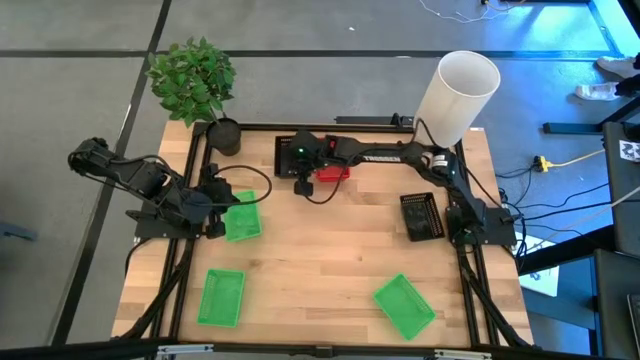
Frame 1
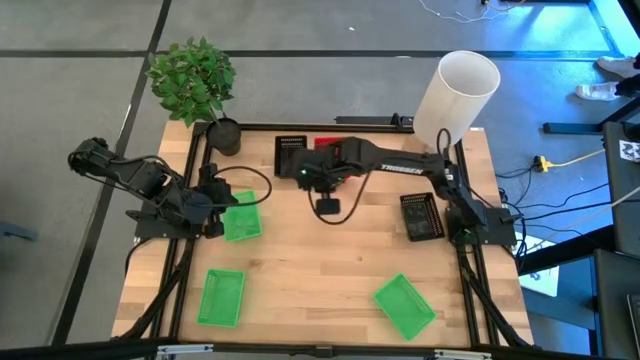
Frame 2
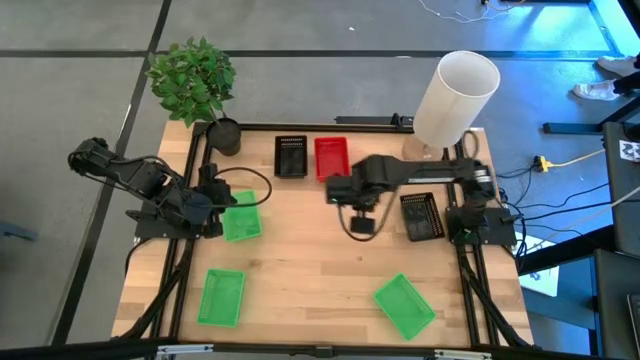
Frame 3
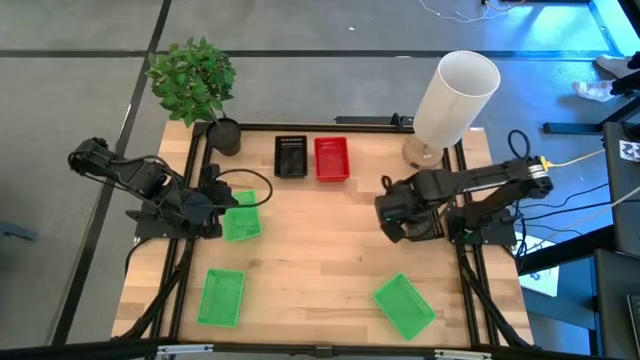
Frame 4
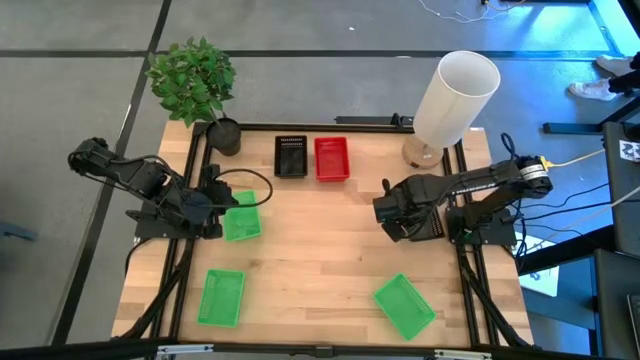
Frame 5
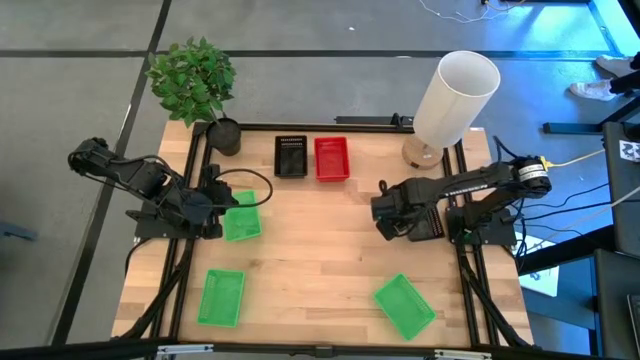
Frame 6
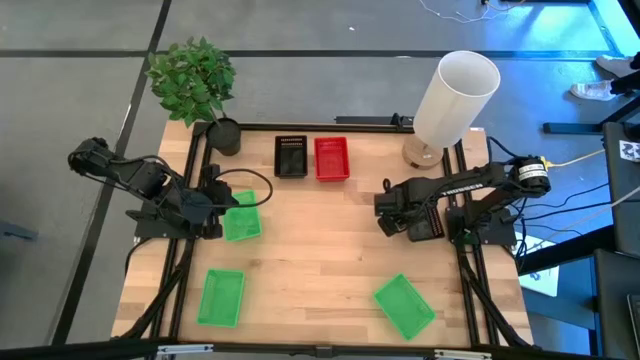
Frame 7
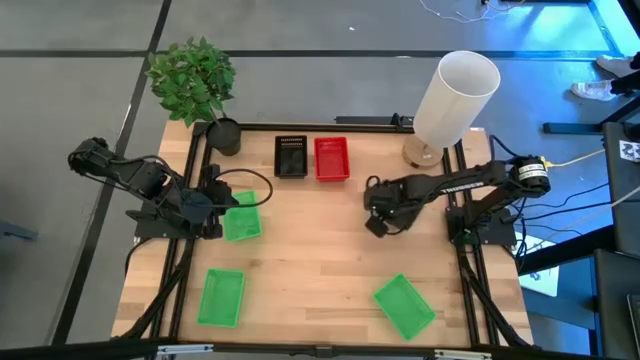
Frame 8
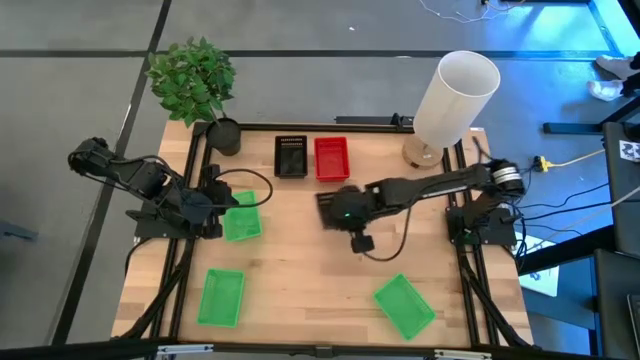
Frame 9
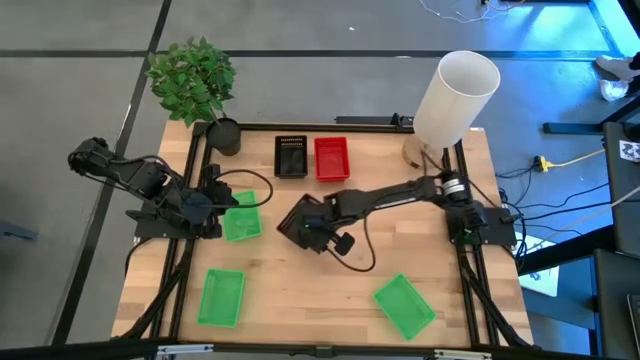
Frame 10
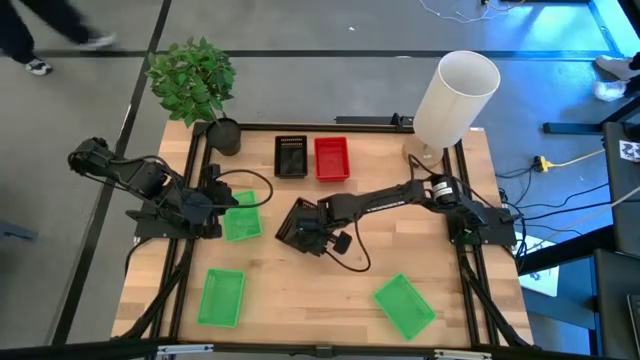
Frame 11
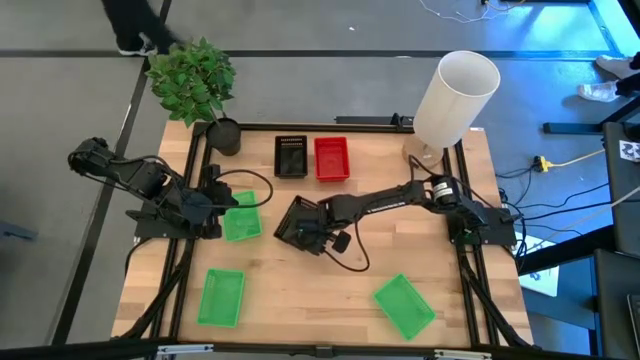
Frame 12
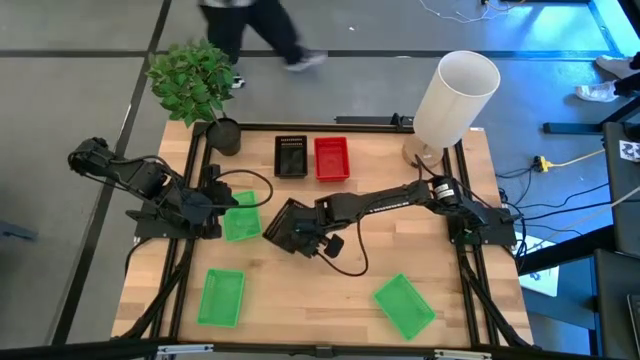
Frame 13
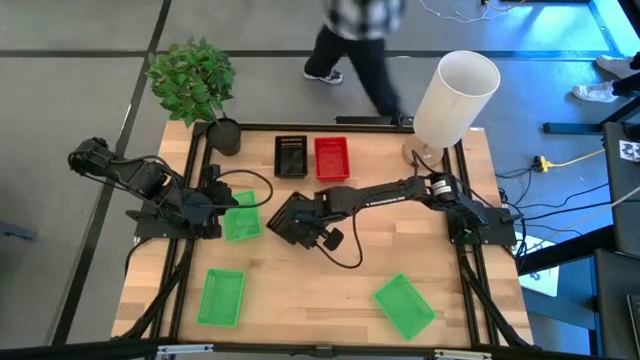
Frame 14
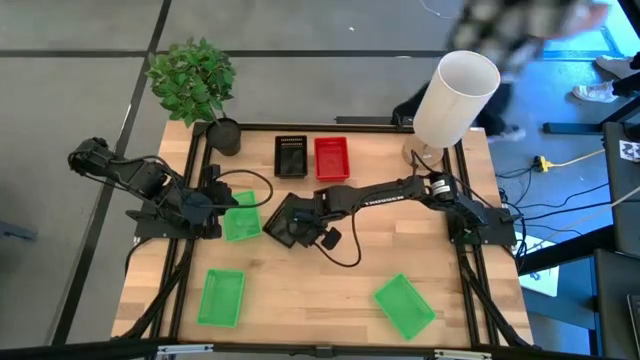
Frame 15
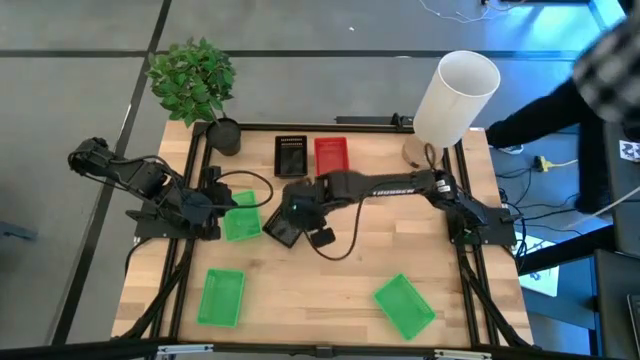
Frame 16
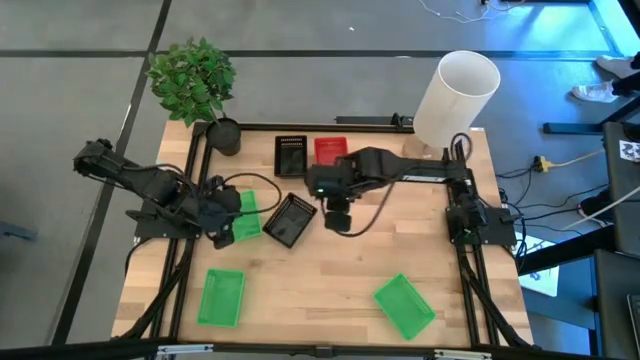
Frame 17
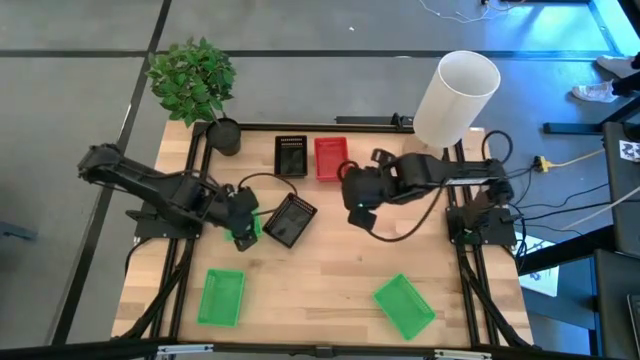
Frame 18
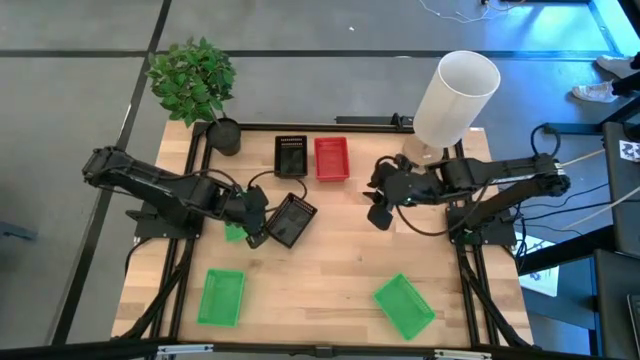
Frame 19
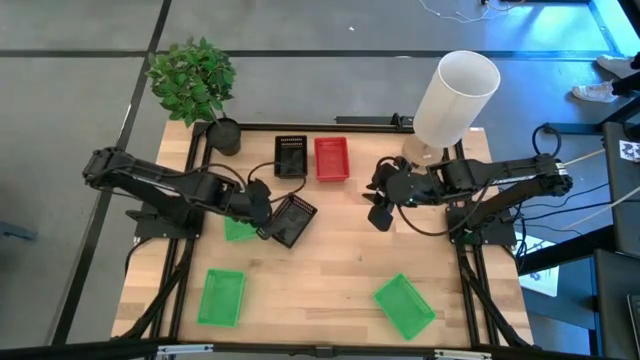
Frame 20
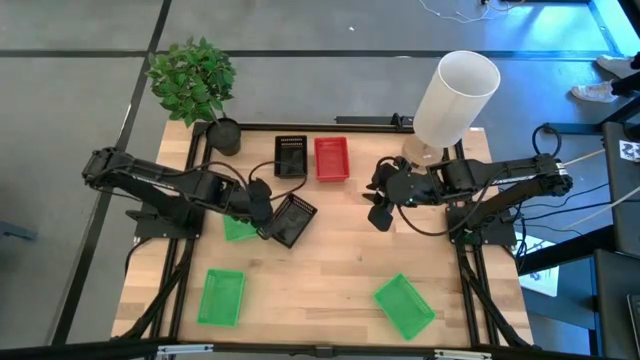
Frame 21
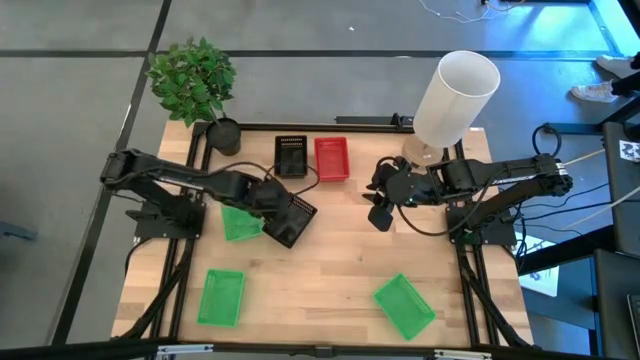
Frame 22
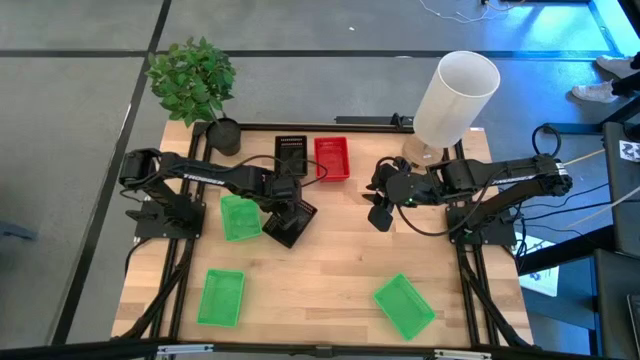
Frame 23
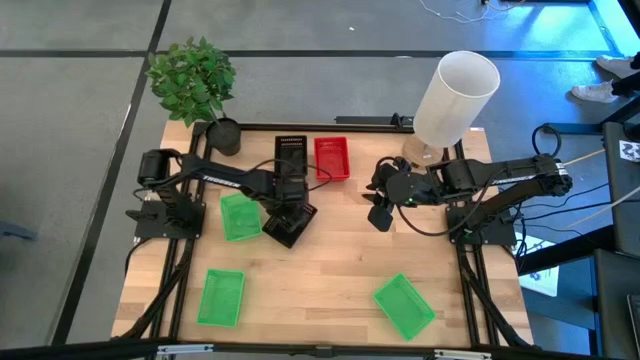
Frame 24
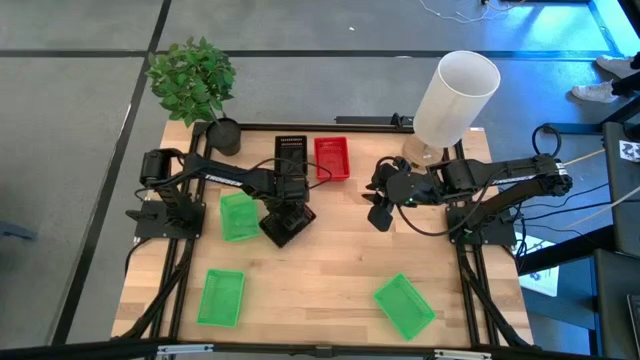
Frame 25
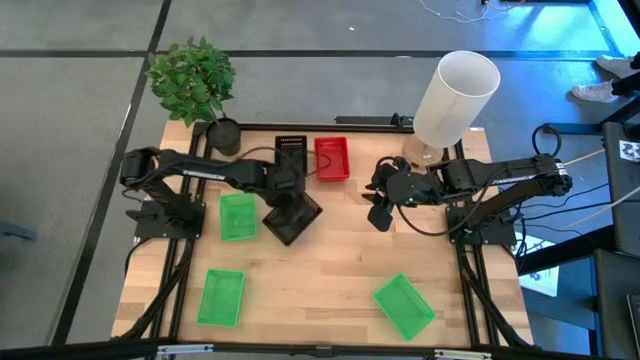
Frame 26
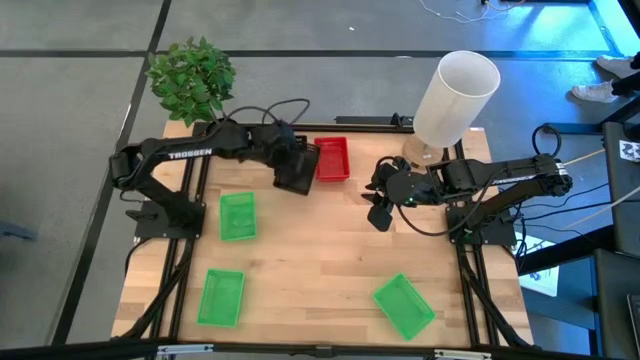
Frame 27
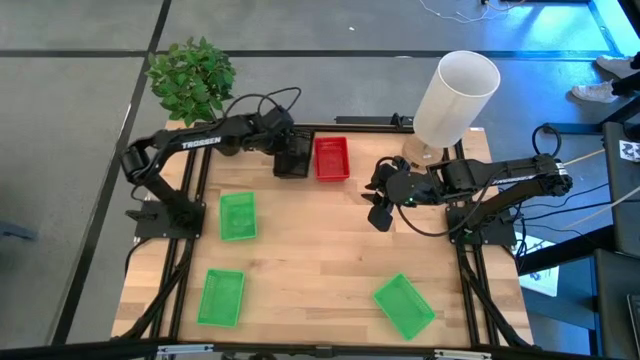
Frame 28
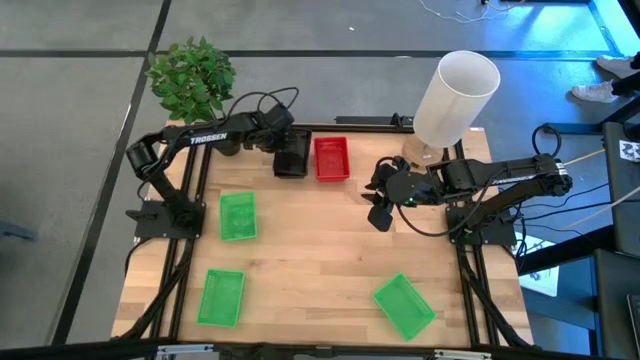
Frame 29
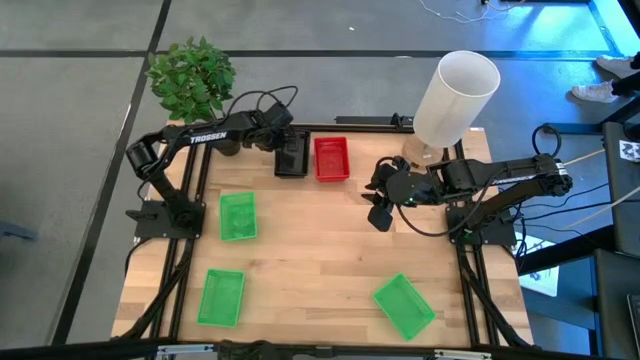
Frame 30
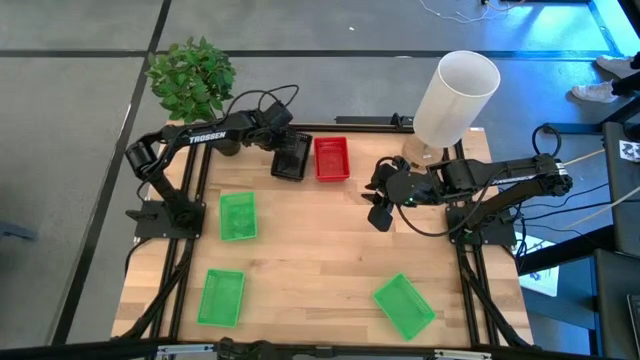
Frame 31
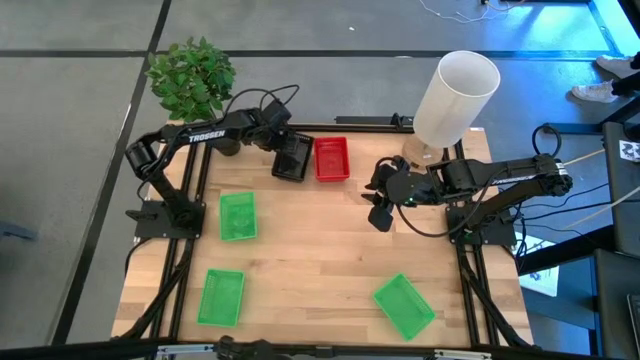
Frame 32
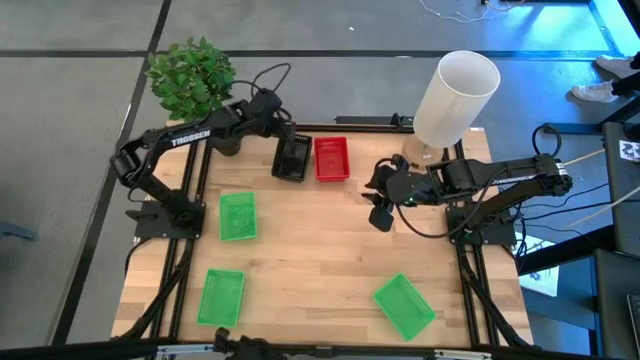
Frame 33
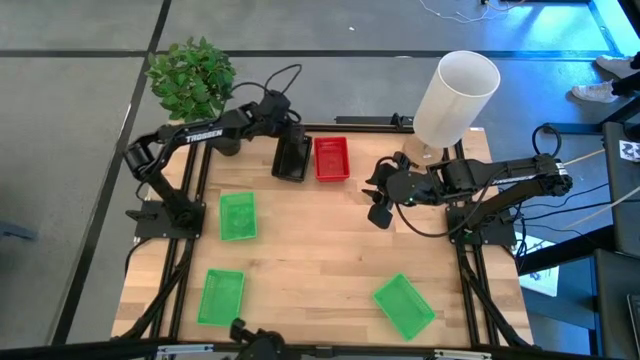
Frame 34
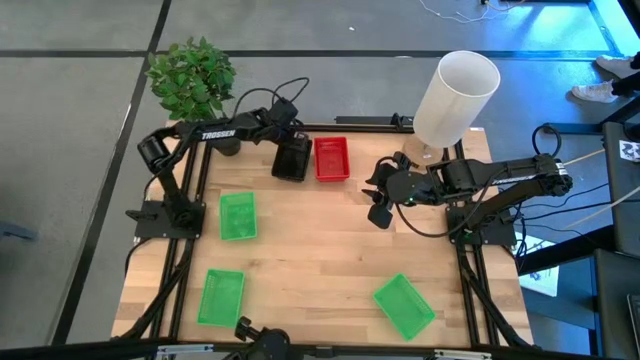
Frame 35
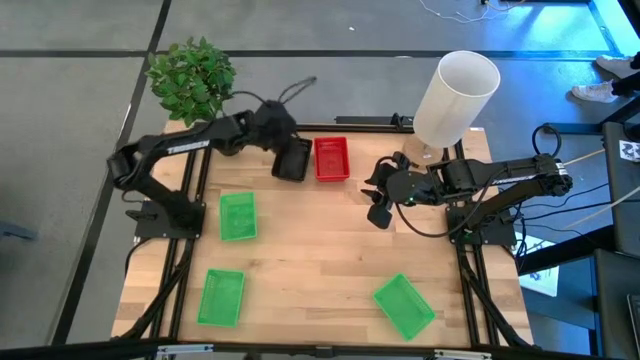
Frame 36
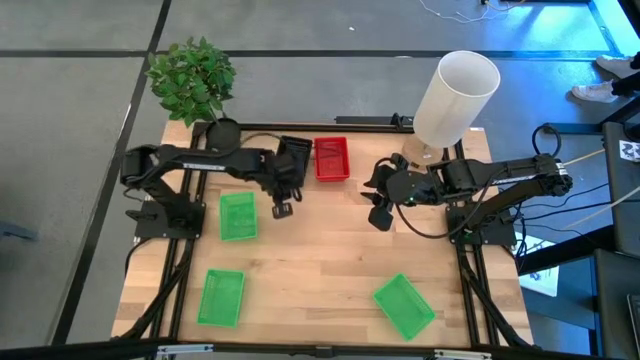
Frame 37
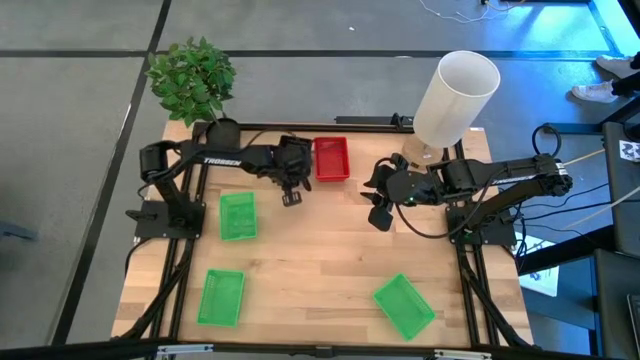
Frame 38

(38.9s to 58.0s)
Stack the bottom black bin on the top stacked black bins

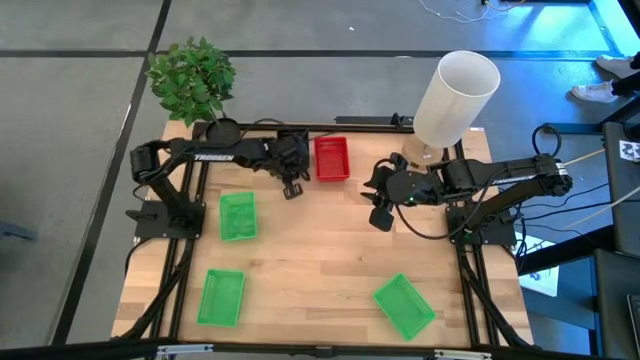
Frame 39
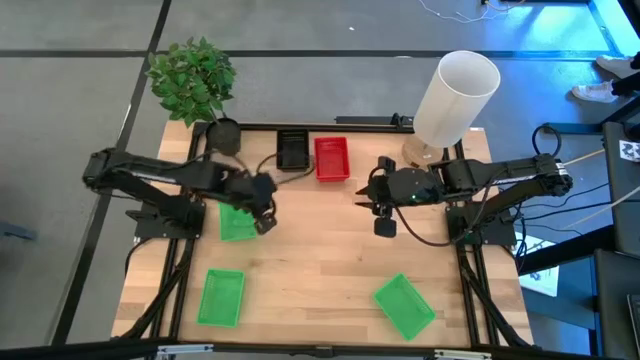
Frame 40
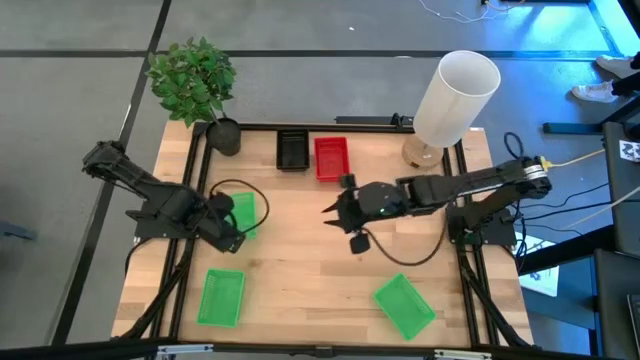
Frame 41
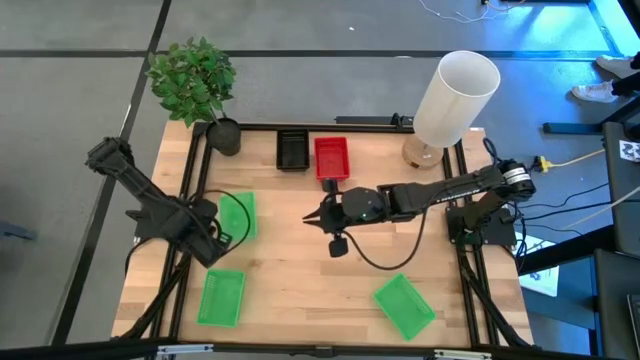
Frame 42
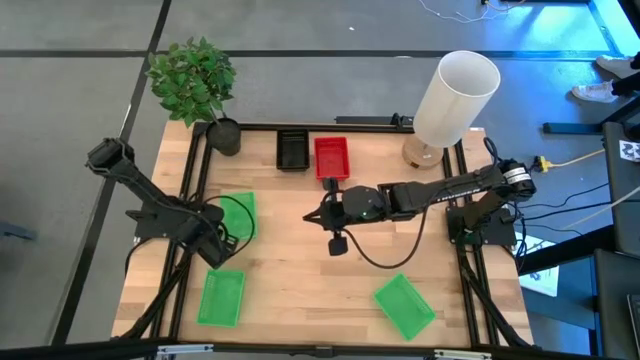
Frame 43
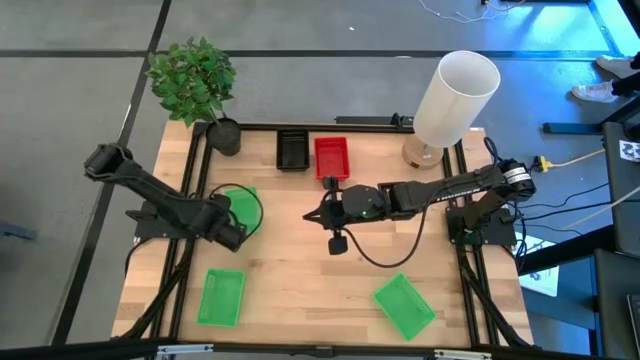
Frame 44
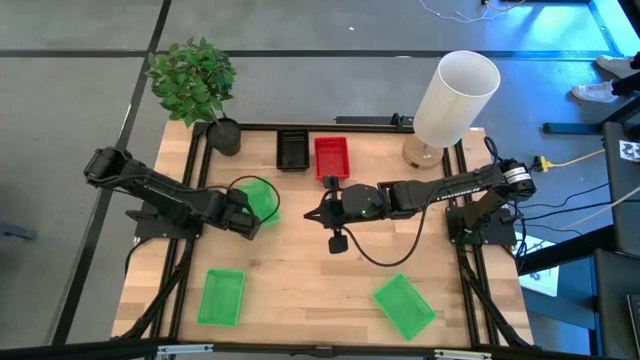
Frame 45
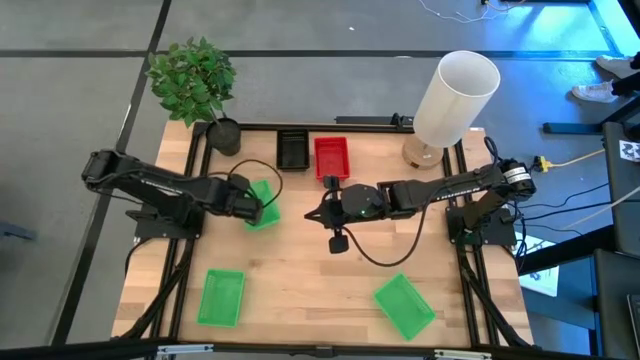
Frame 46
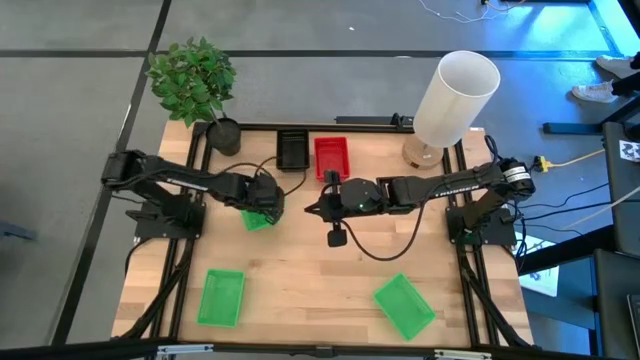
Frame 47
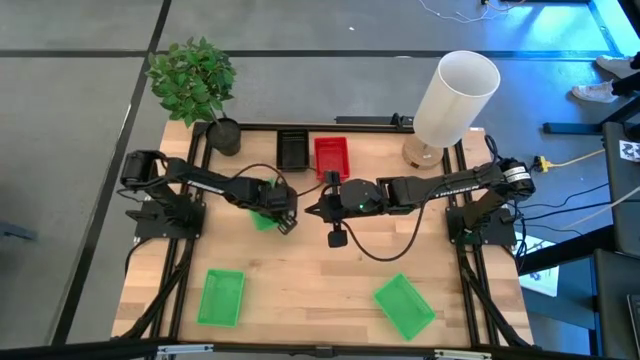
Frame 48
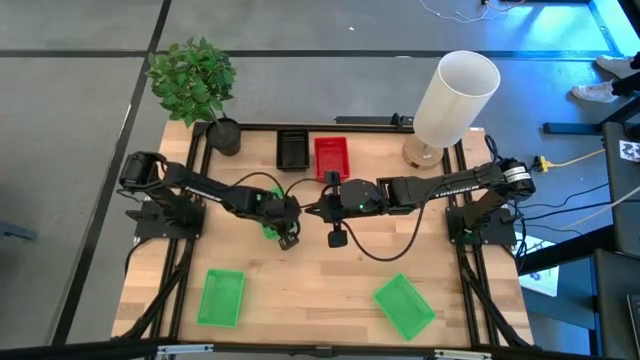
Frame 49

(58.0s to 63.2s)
Adjust the top left green bin
